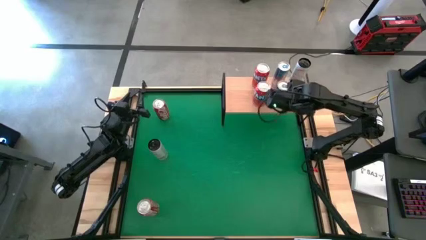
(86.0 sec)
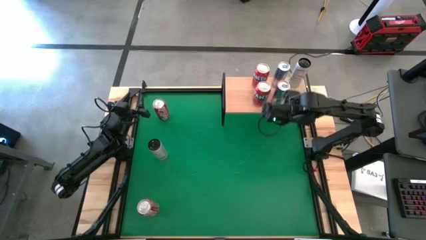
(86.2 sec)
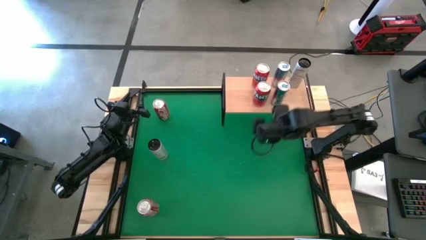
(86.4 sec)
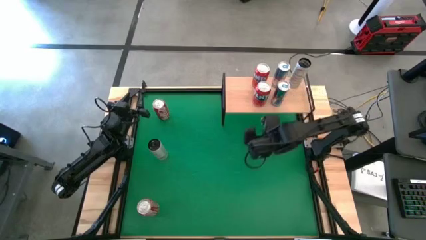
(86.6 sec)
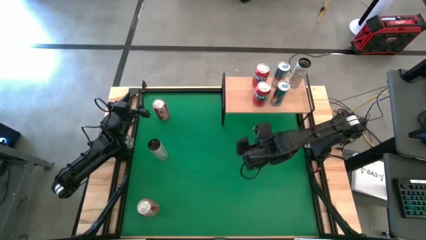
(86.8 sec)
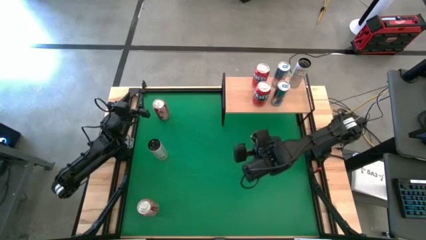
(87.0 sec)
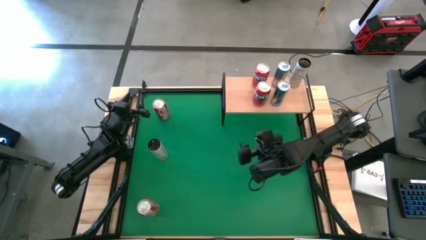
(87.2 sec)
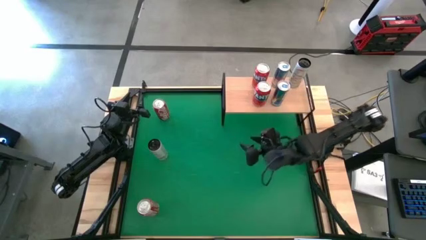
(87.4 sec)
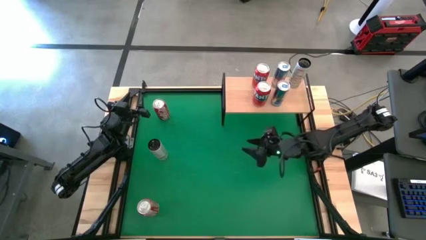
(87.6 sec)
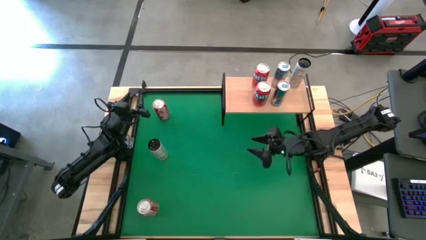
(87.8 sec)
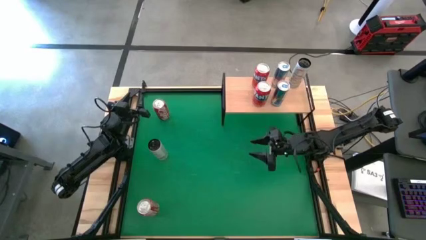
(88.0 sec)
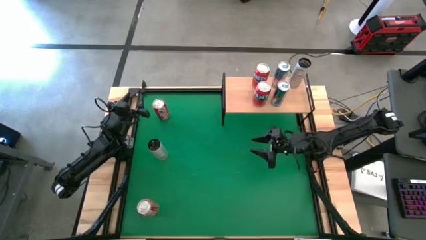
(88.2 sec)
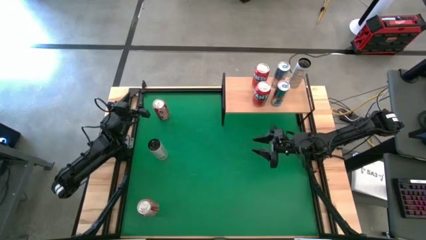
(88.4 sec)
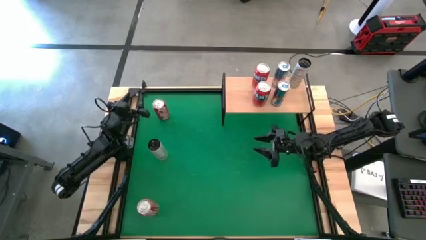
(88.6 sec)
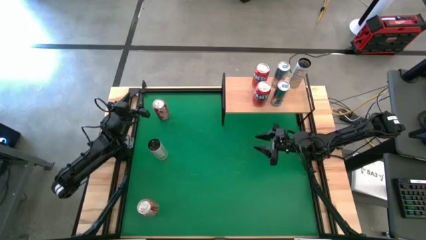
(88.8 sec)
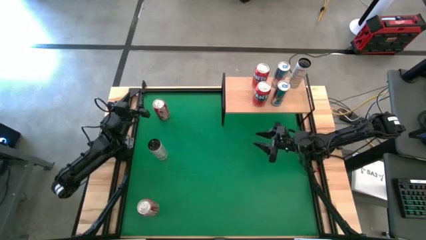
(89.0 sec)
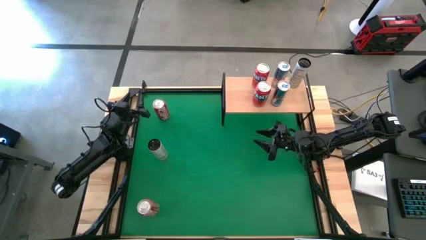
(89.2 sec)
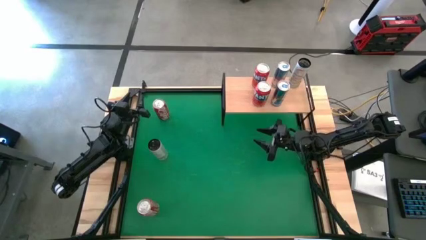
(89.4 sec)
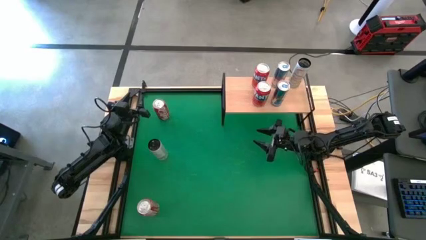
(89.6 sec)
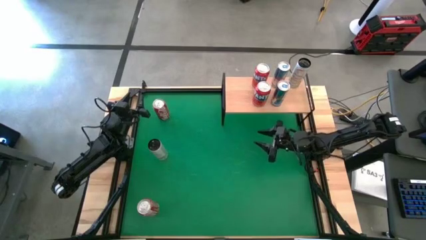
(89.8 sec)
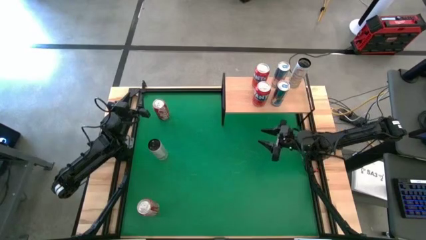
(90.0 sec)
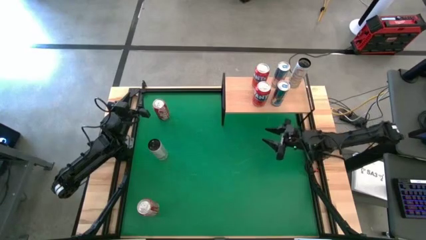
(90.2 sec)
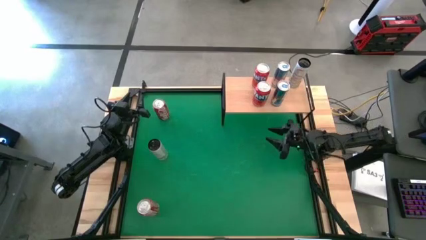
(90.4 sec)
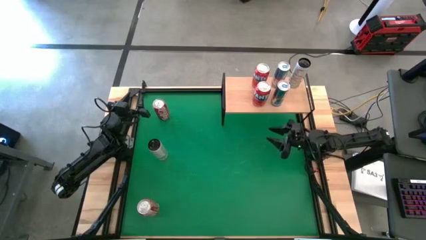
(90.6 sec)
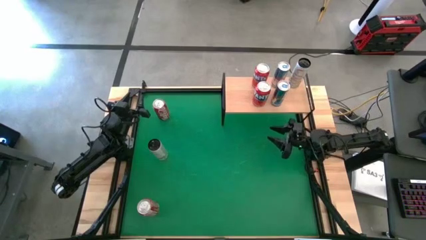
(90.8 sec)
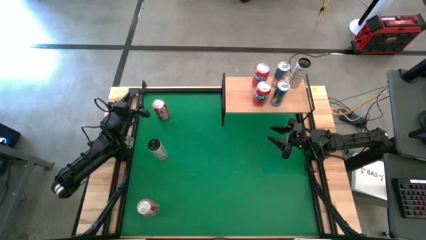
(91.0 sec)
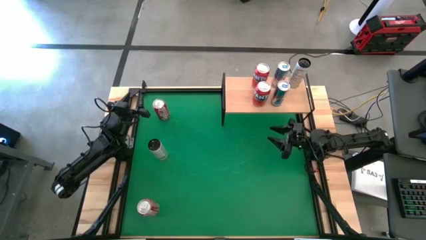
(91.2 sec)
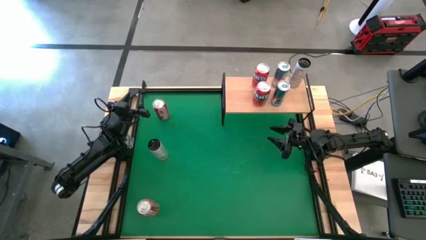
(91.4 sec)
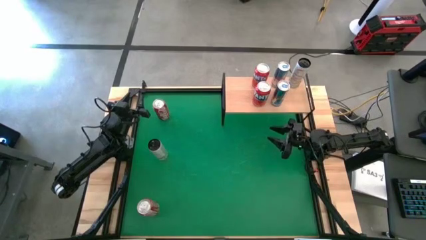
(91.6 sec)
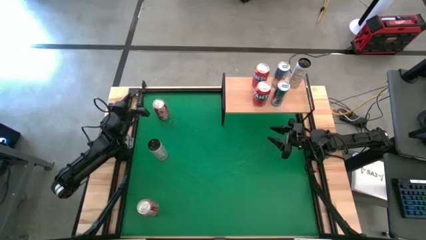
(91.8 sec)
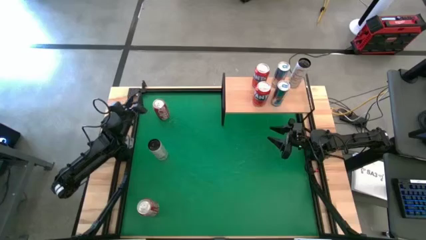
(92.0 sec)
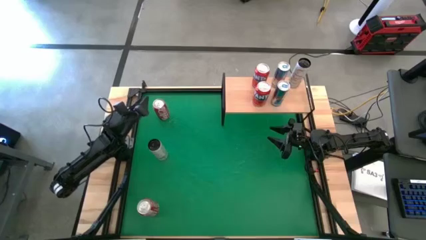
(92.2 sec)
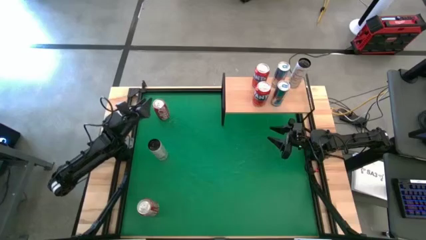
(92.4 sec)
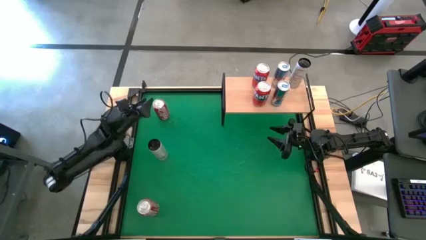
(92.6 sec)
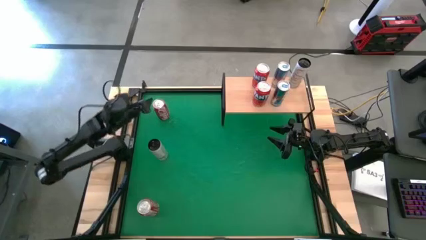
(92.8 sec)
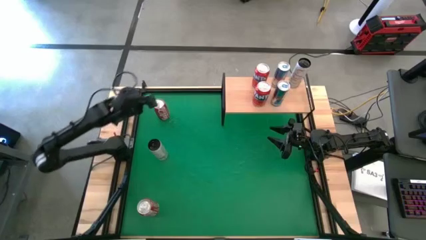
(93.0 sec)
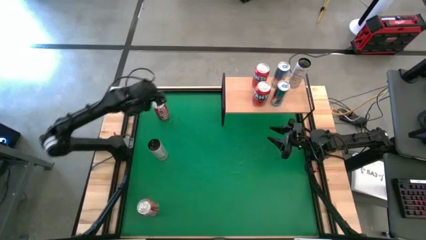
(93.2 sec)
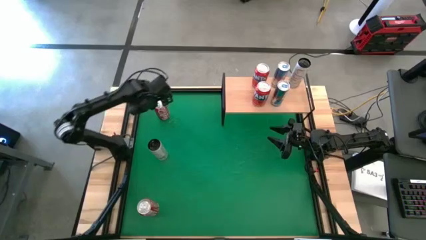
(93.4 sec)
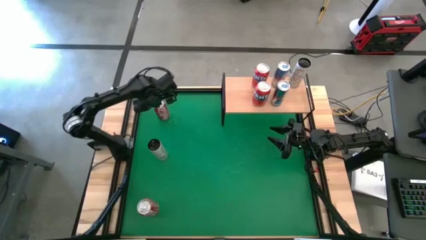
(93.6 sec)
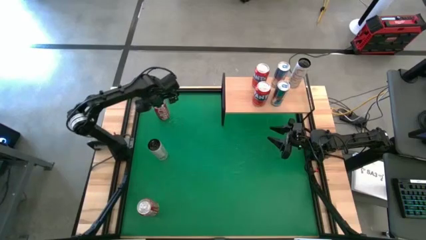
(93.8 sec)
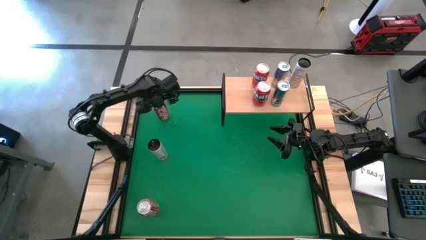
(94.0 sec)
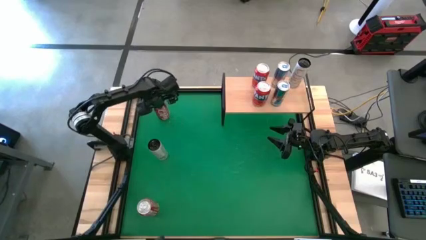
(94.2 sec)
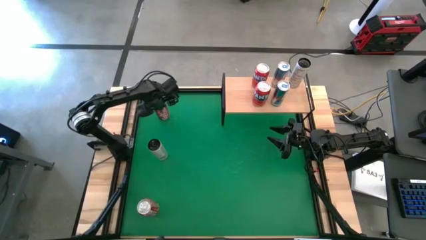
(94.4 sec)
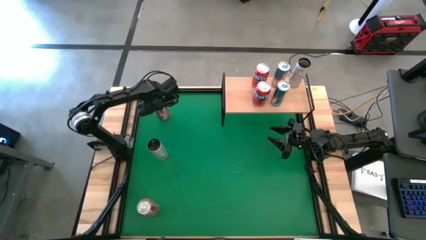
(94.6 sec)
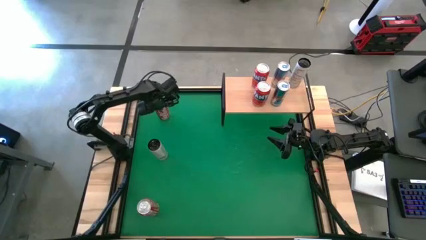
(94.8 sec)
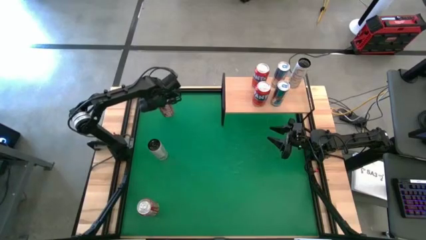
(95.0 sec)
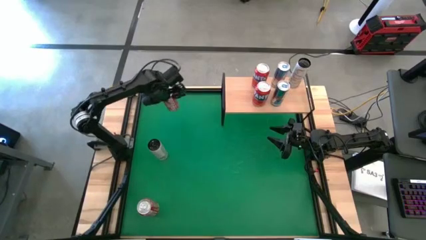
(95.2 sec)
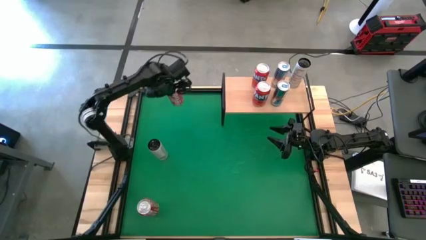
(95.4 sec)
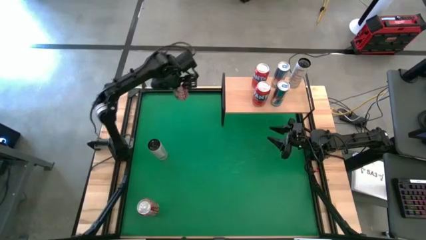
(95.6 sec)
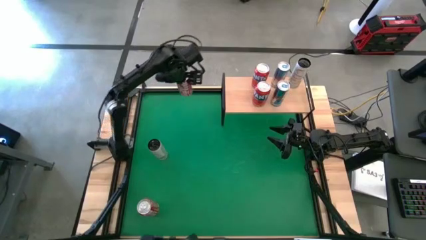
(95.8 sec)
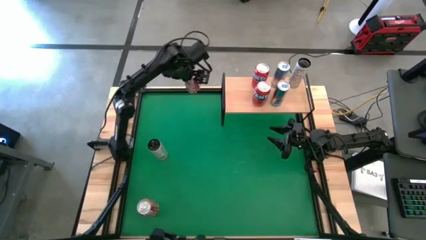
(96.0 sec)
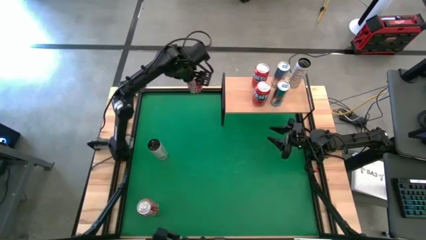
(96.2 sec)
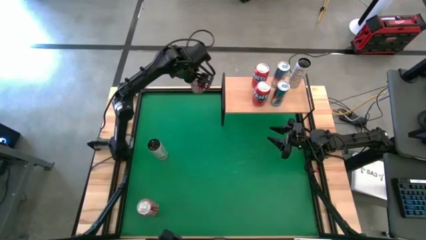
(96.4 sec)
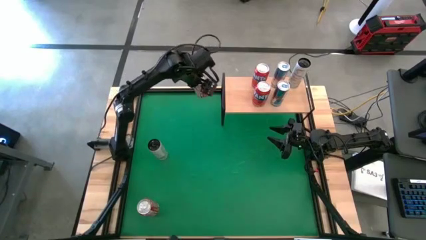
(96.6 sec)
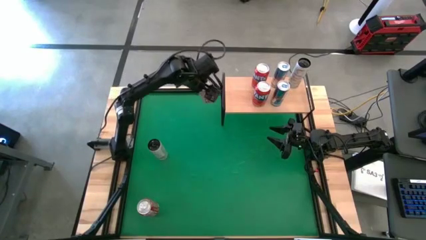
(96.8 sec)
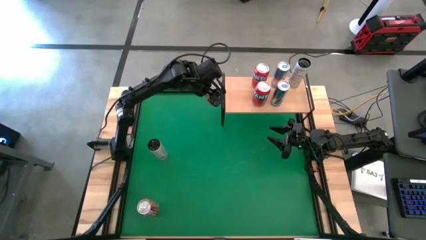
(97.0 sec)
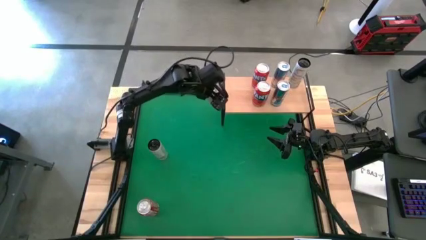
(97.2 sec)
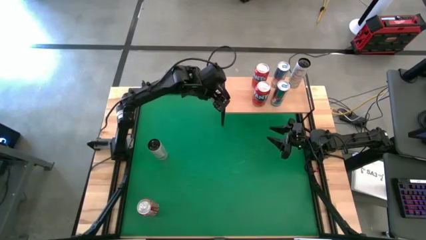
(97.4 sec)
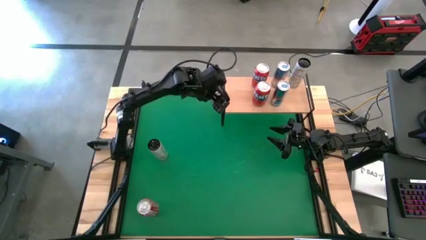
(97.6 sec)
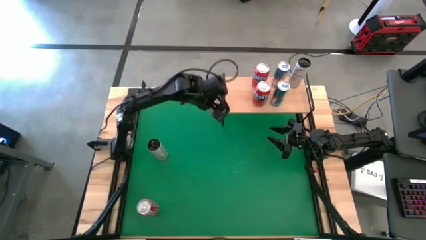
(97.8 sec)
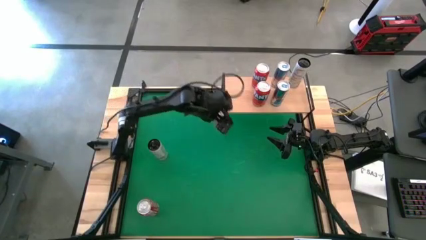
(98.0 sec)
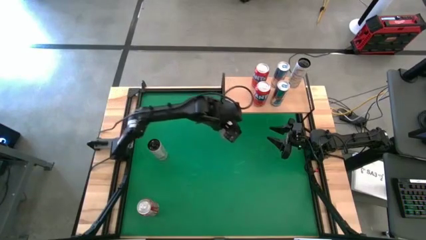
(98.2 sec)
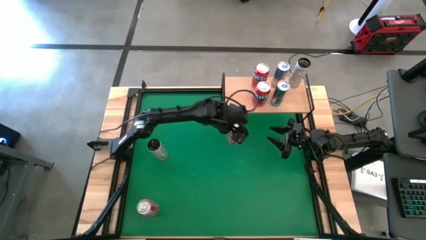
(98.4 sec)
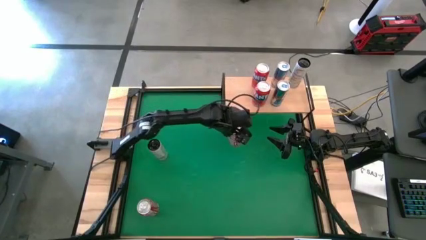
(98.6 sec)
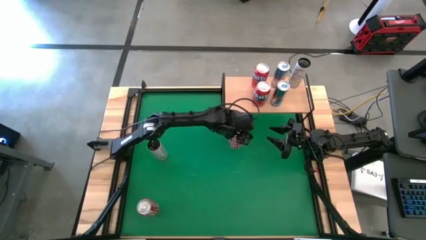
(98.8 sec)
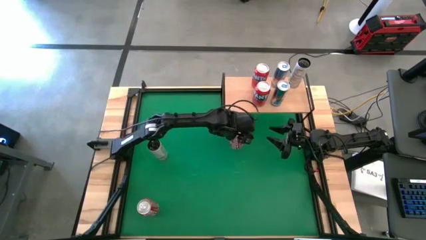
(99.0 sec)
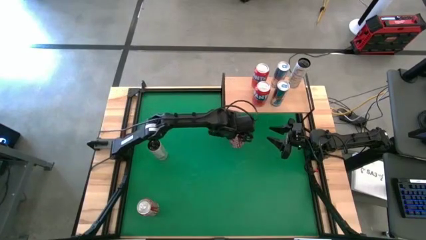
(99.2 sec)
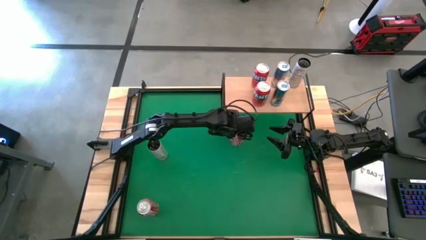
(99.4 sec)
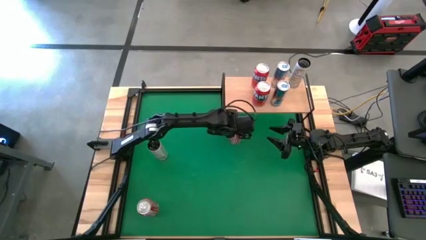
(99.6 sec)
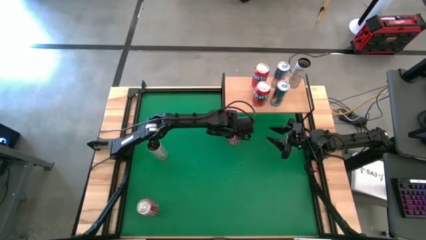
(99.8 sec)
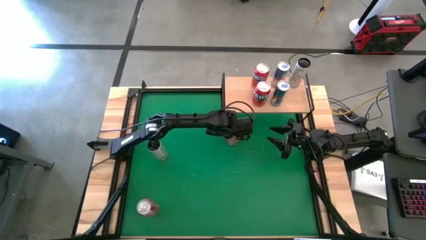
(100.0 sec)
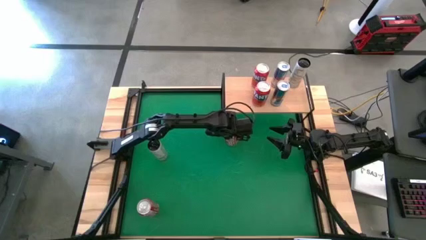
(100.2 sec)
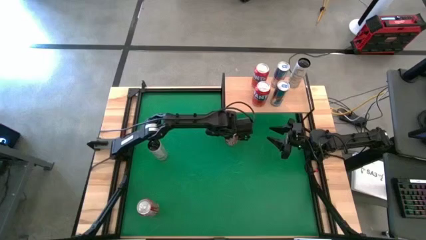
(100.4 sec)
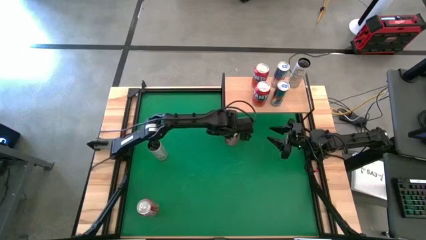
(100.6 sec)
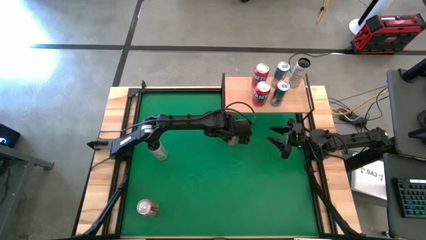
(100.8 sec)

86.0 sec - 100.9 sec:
Task: Place canned beverage on shelf
Move the top red white soda can to the center of the table
